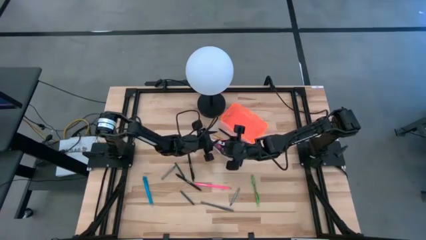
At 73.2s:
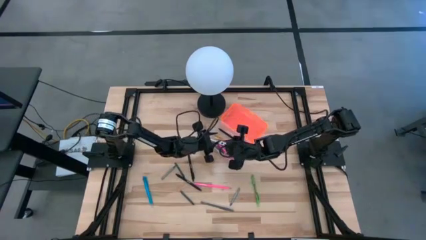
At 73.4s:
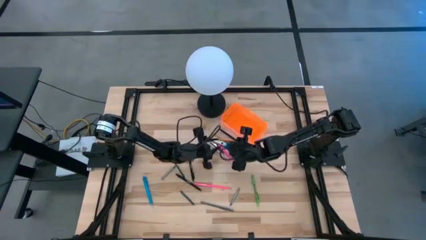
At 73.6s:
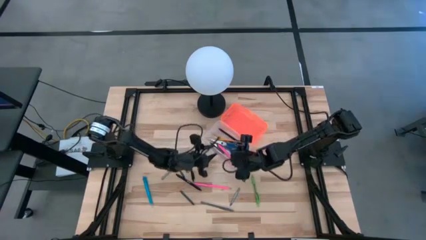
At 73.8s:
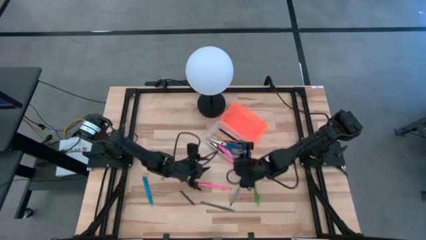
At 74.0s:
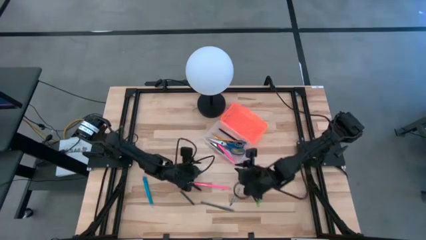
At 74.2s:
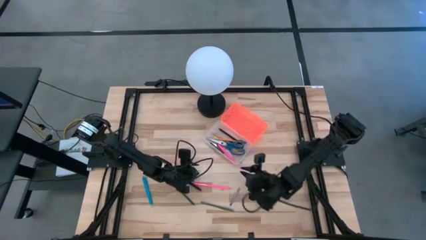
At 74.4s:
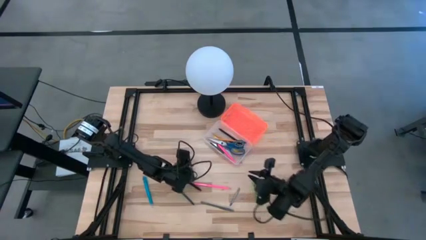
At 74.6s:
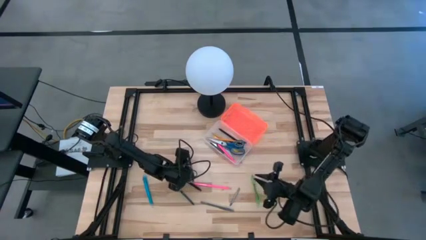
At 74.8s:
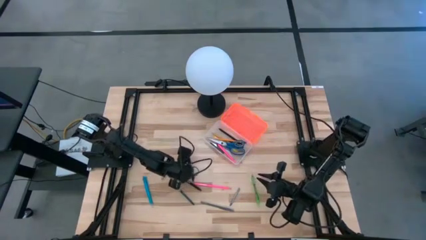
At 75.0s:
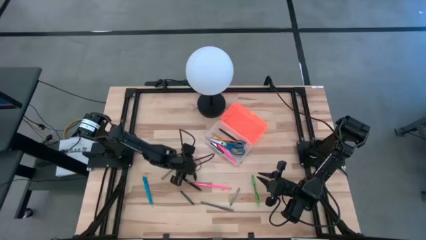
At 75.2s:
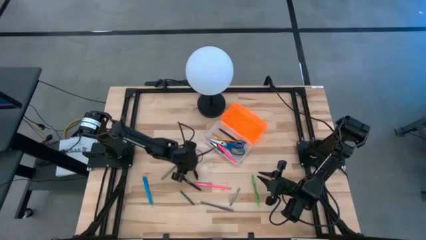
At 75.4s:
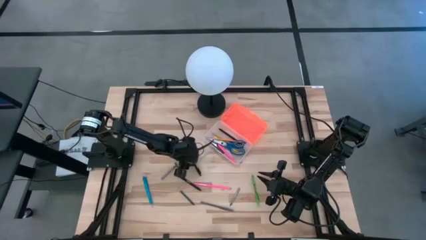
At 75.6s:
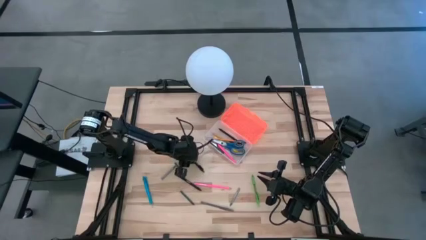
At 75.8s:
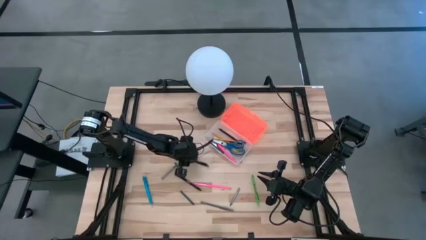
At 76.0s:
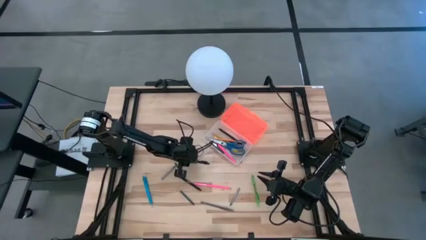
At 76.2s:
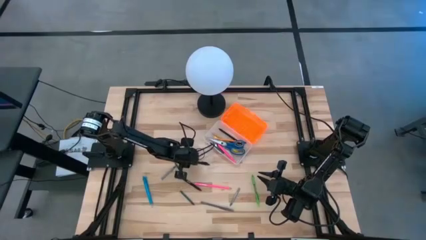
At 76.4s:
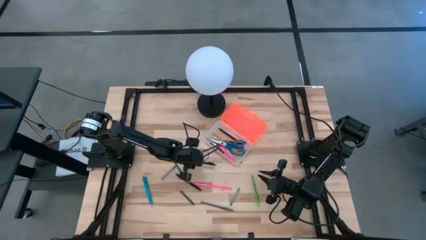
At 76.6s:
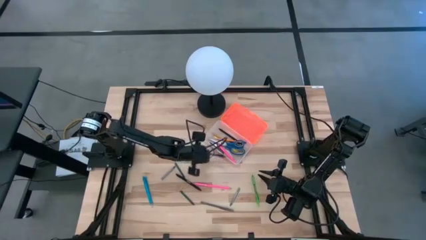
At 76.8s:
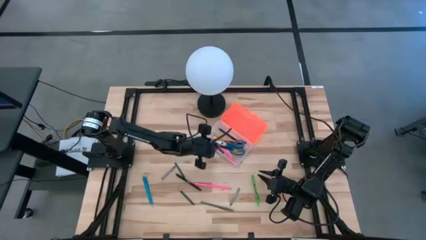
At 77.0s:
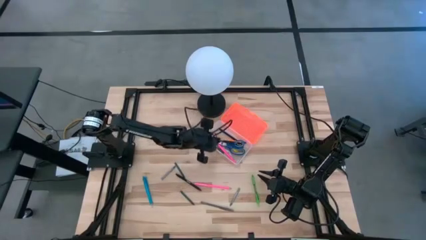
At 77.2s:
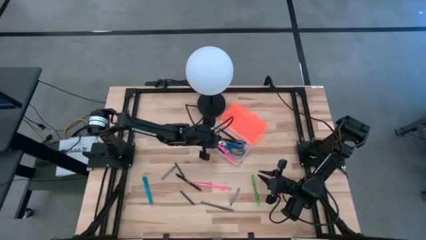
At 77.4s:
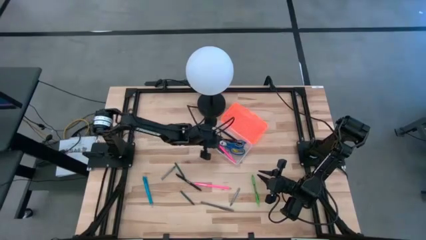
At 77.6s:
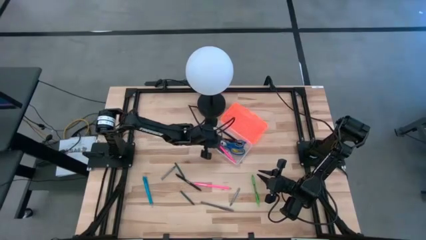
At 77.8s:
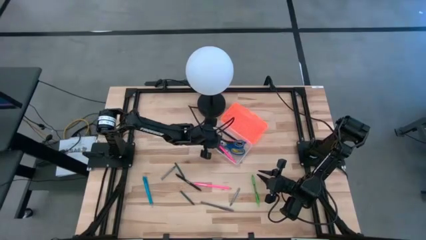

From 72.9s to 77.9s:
Task: Pick & place school supplies into a supply box
Put the black pen into the orange supply box

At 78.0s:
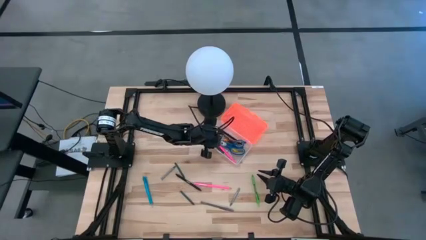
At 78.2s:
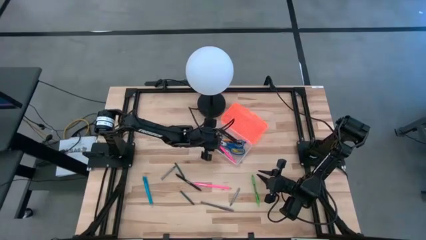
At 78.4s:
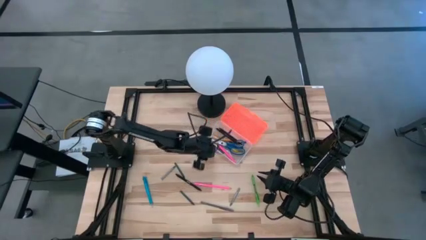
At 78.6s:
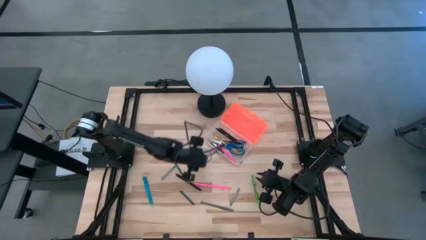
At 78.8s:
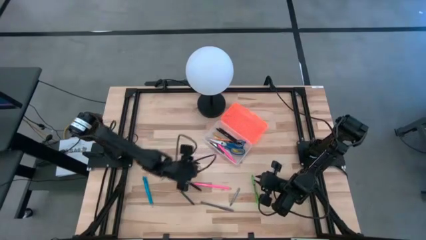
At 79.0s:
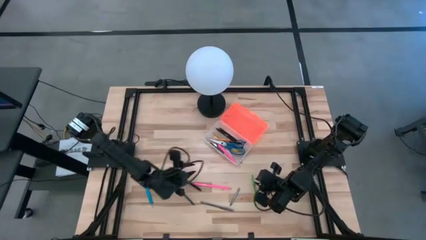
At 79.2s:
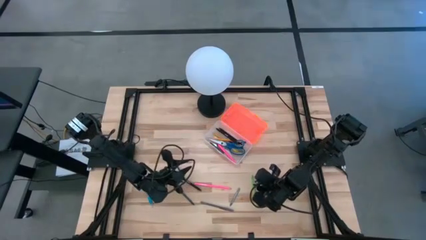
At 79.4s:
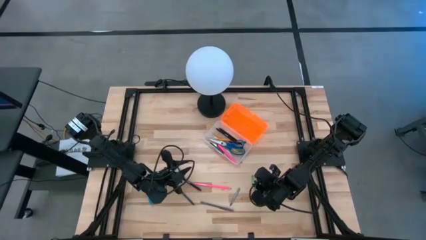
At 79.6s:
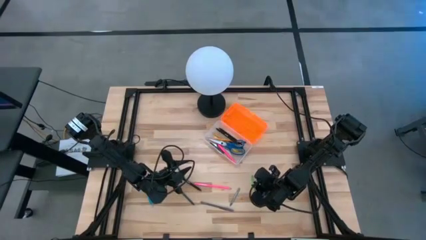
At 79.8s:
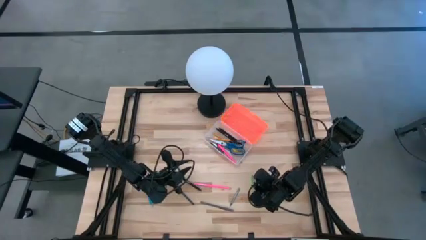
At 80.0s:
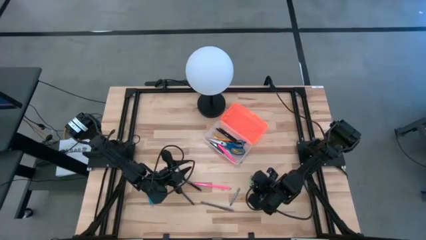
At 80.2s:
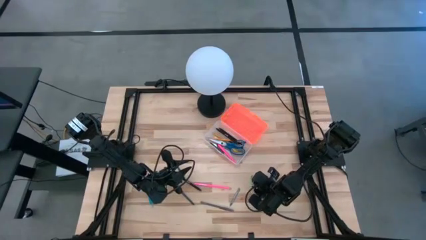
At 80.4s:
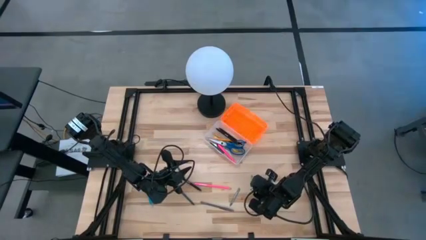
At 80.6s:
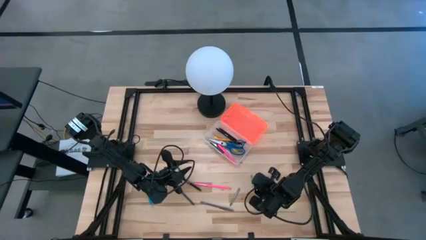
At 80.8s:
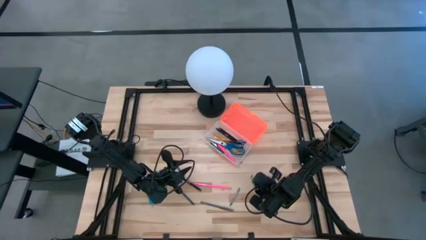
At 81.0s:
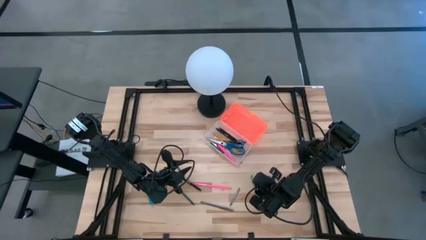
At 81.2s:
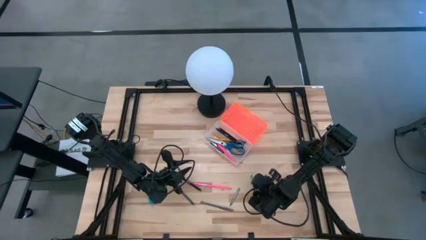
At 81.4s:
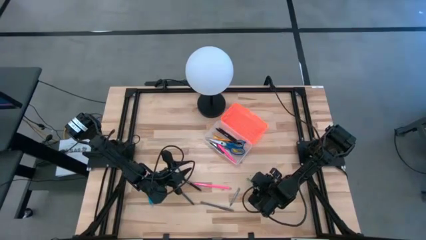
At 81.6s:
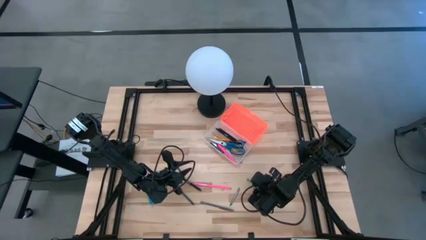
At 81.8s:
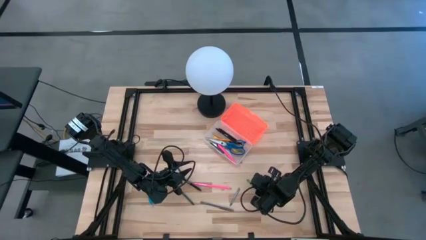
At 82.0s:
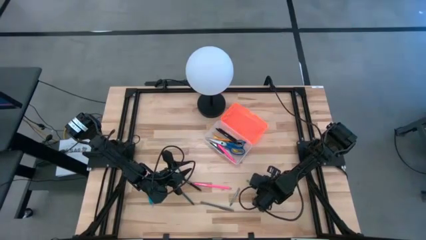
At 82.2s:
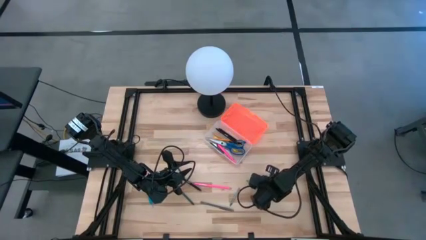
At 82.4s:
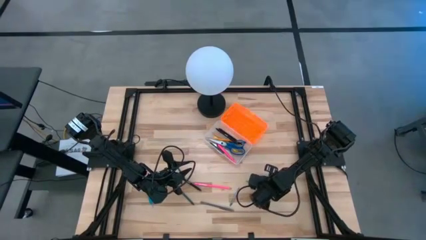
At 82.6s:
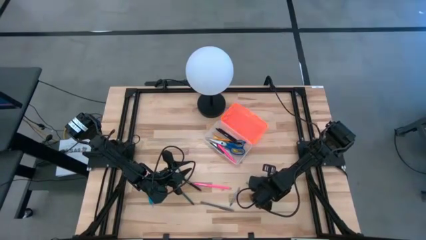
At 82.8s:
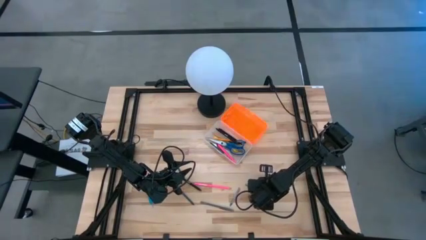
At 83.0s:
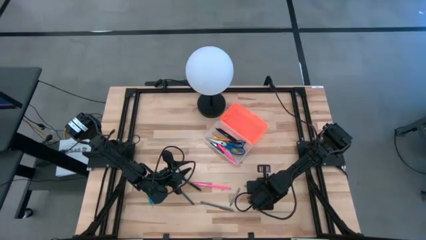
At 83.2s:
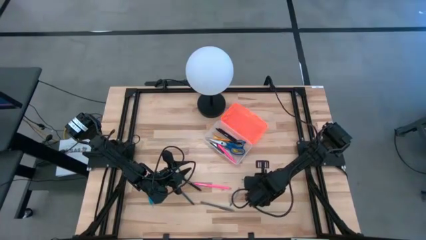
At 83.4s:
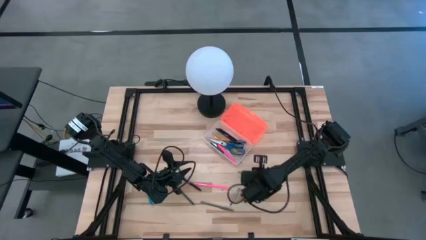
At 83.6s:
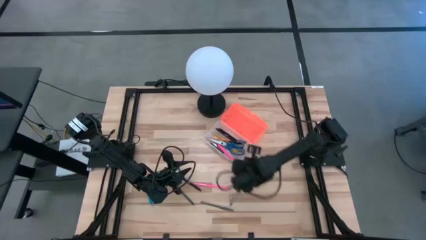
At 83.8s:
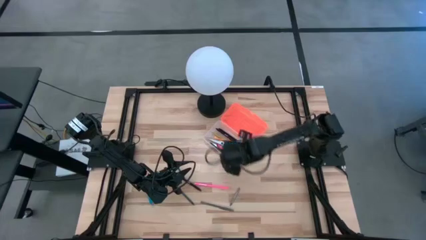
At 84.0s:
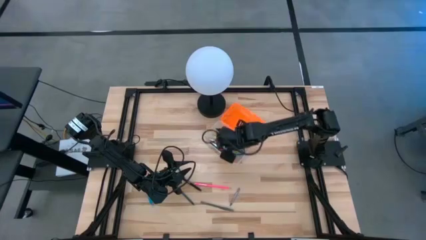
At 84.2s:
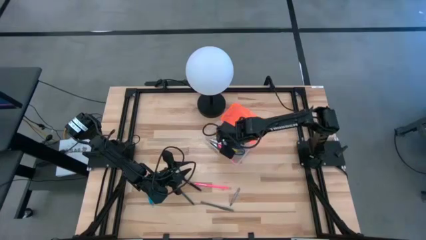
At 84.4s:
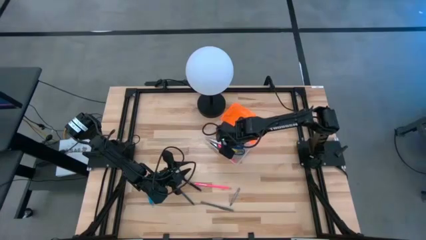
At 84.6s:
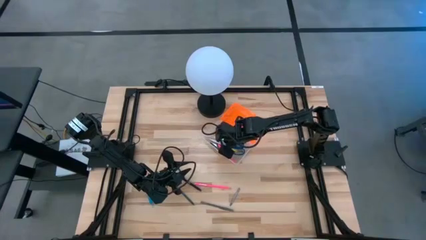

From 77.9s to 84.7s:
Put the green pen into the orange supply box

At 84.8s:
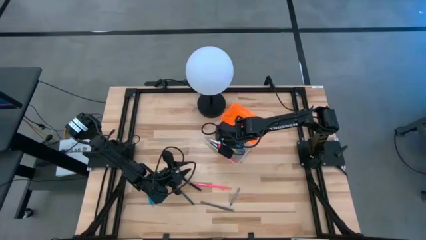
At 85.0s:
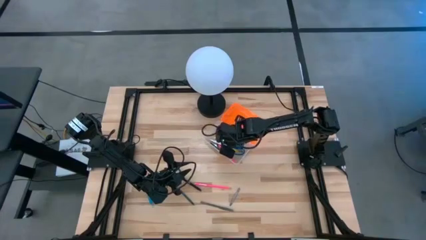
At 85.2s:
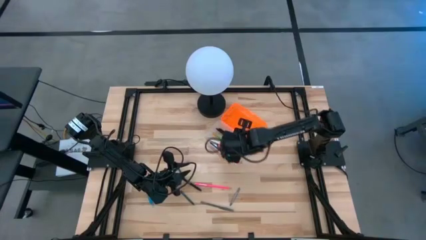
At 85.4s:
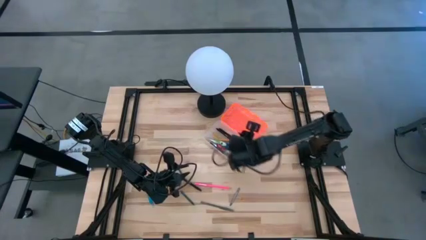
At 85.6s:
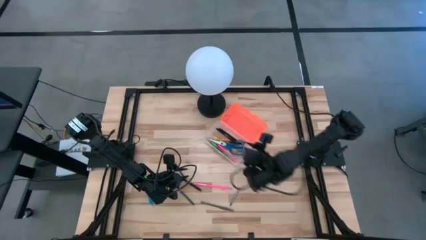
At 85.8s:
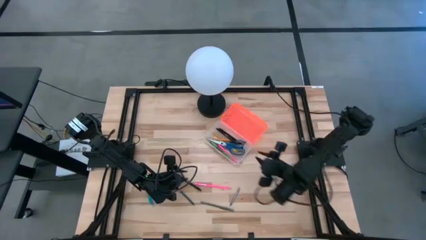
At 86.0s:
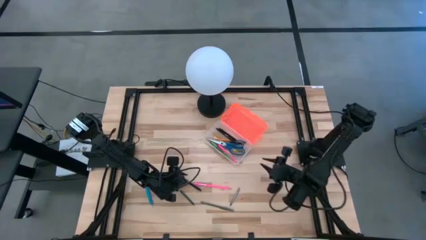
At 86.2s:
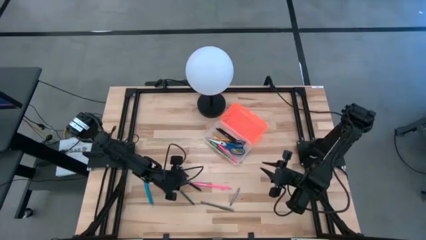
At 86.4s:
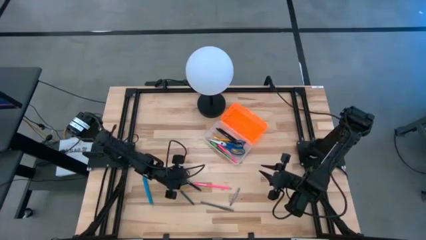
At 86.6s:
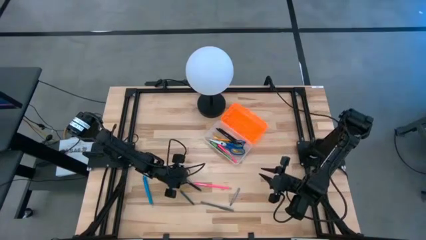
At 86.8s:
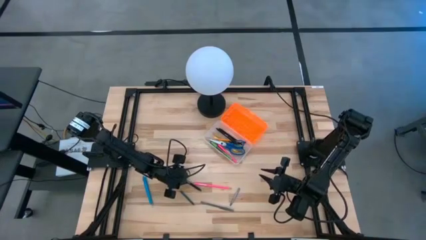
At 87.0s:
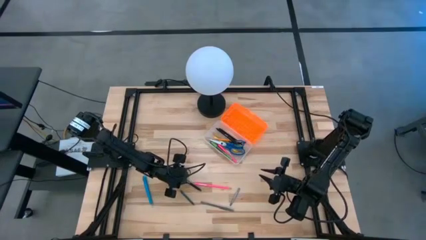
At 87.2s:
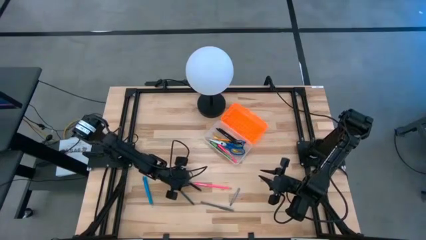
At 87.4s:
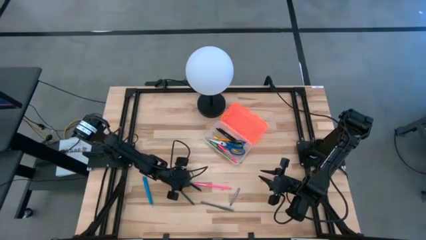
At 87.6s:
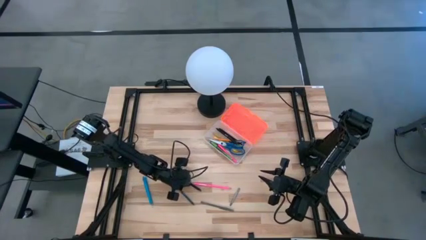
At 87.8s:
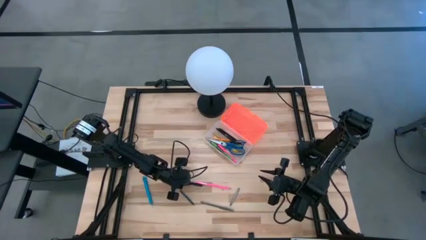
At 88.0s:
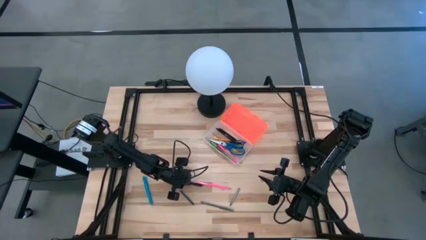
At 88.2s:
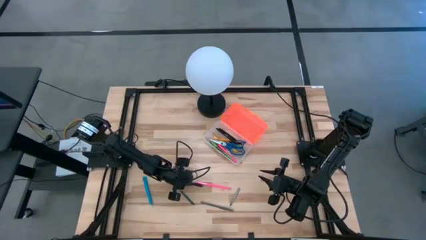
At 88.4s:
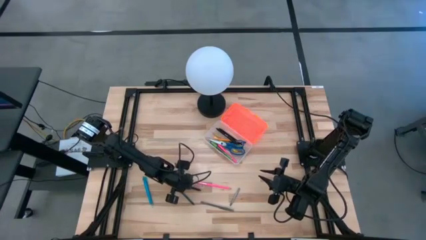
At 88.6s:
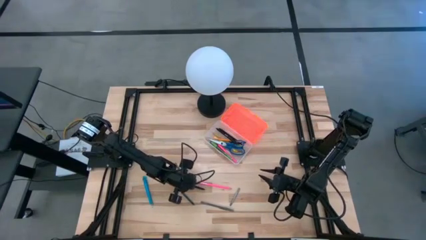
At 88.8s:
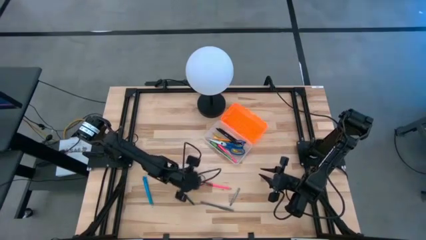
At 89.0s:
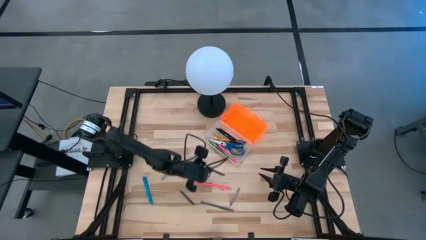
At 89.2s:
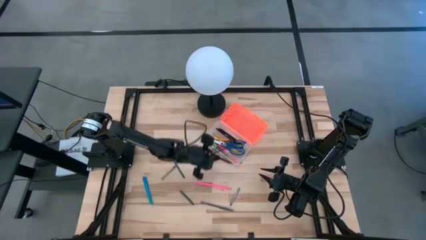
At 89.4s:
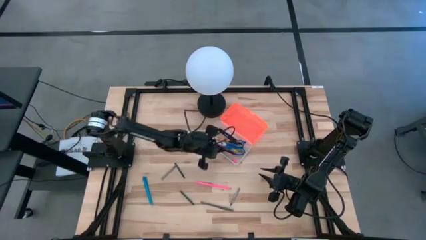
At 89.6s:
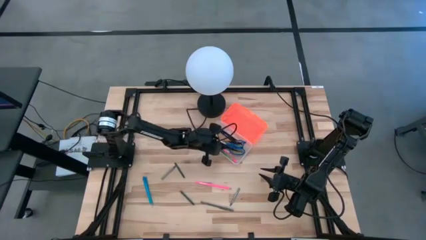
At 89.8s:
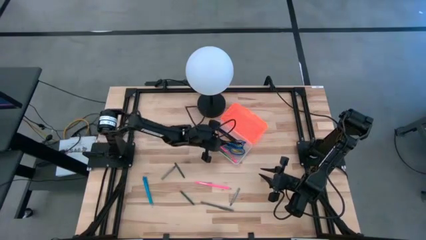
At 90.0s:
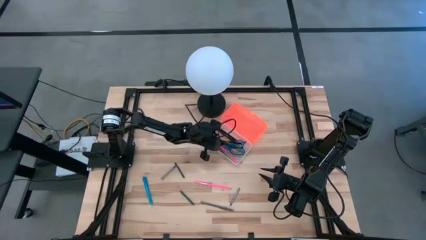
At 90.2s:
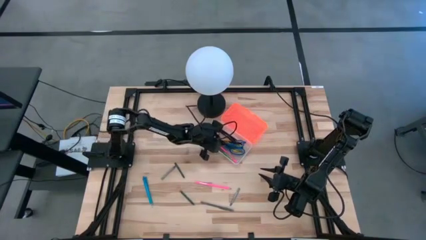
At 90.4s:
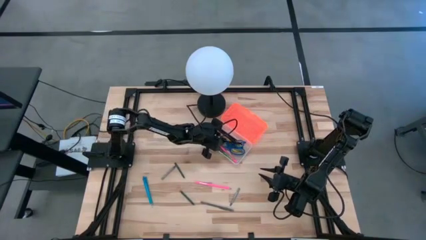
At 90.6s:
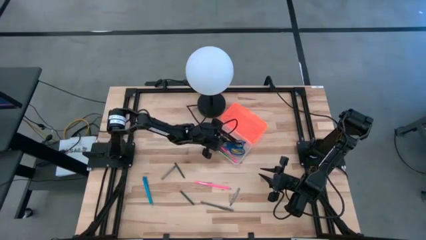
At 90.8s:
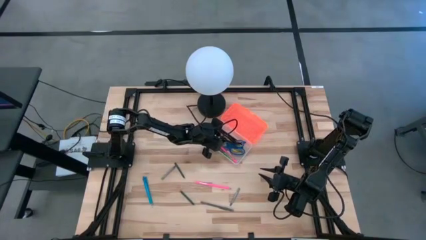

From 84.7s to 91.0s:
Put the black pen into the orange supply box
